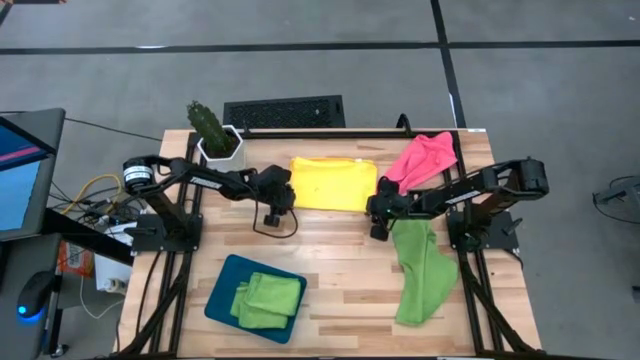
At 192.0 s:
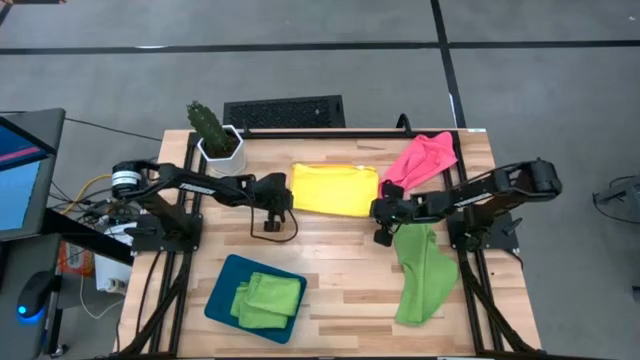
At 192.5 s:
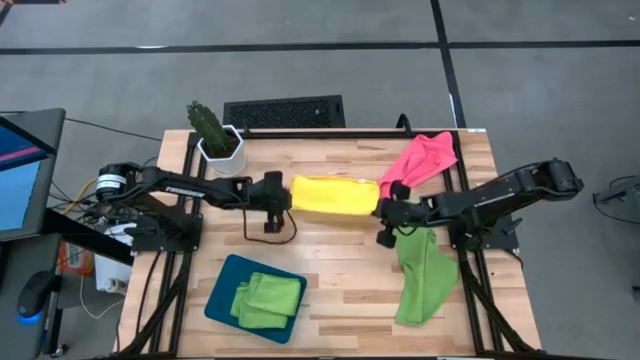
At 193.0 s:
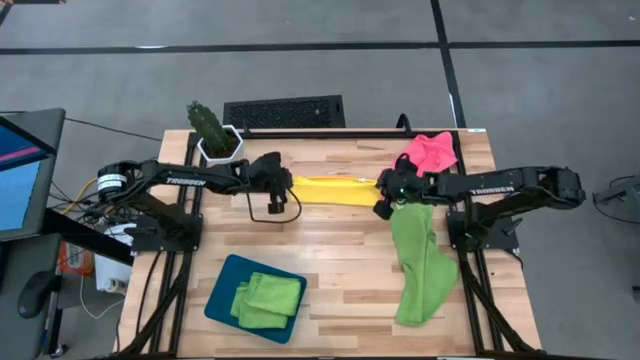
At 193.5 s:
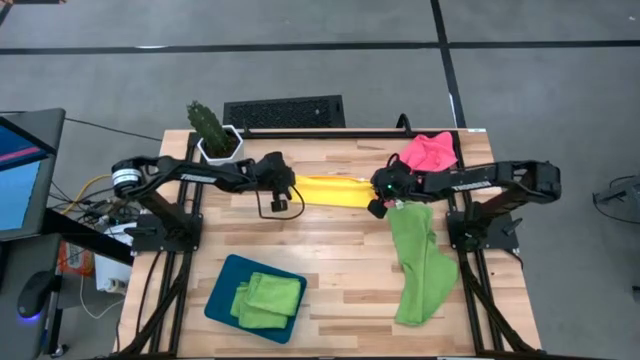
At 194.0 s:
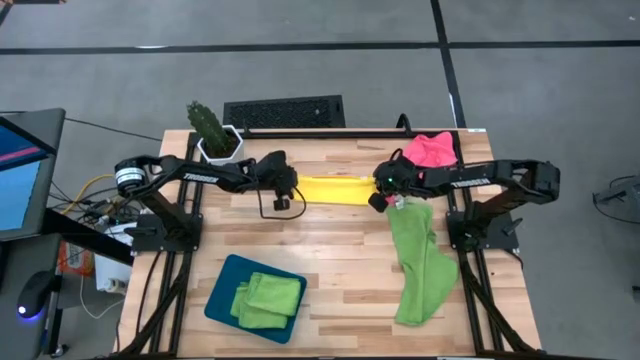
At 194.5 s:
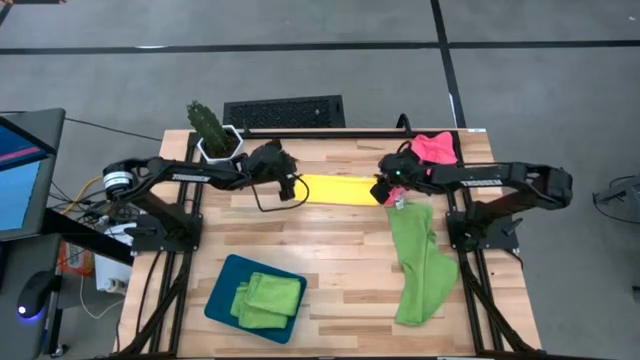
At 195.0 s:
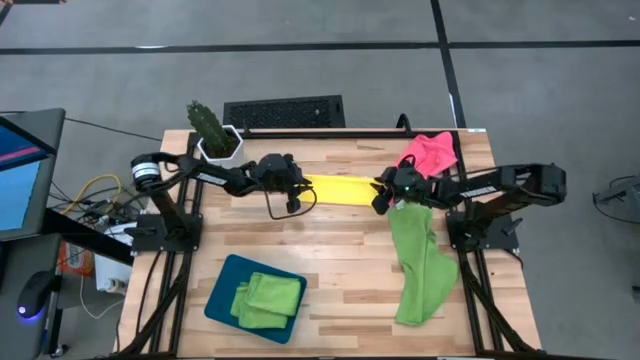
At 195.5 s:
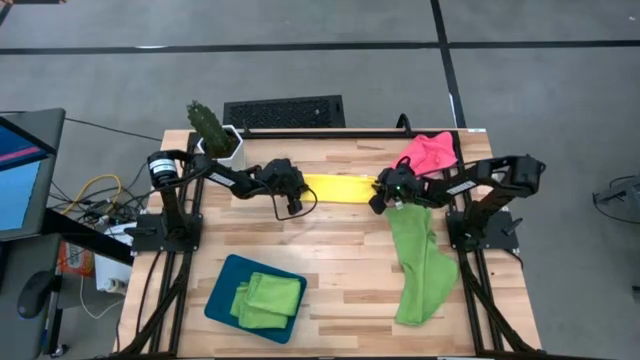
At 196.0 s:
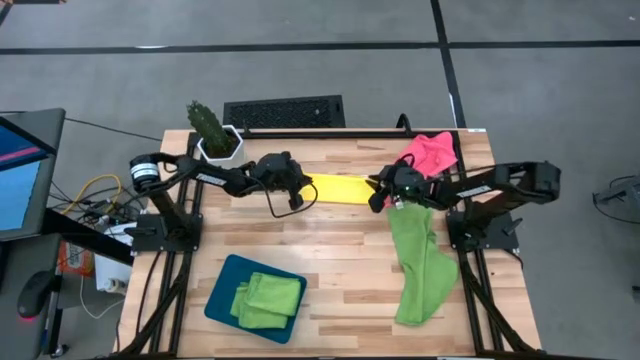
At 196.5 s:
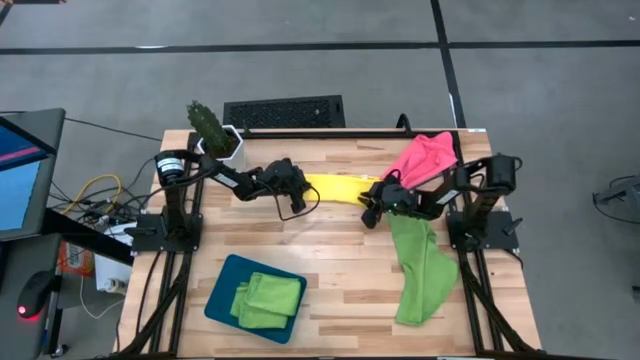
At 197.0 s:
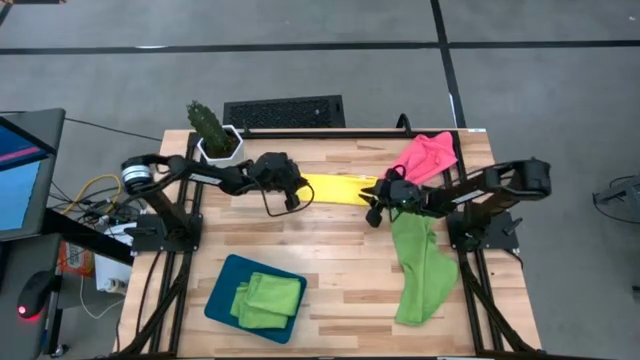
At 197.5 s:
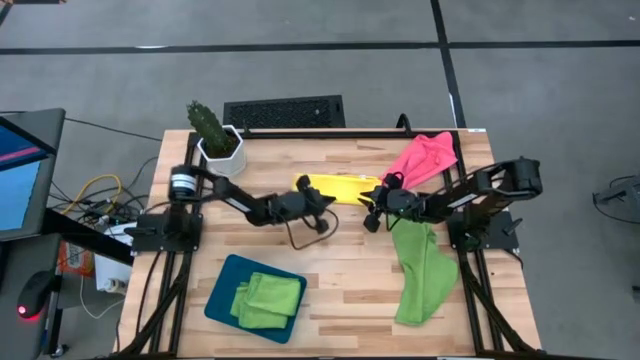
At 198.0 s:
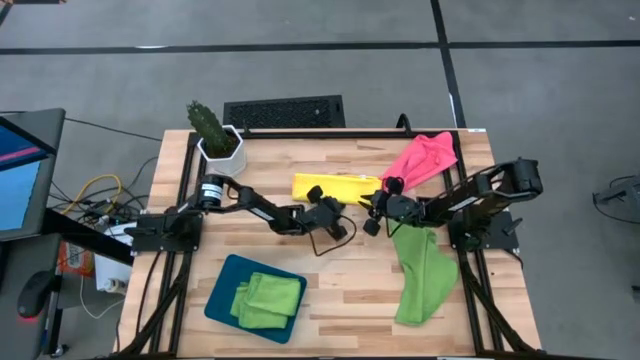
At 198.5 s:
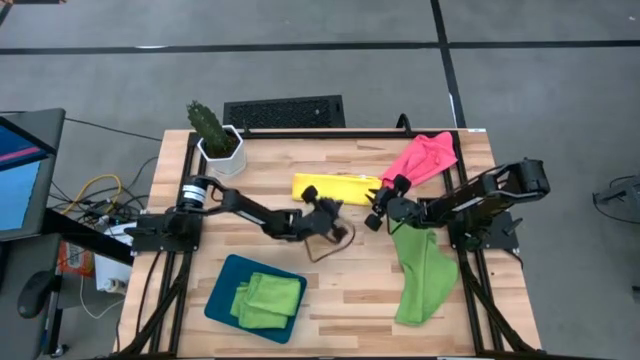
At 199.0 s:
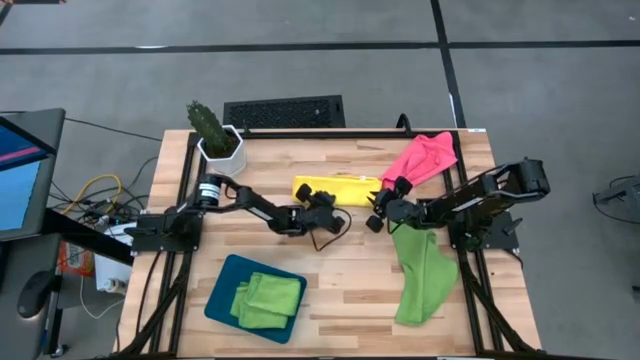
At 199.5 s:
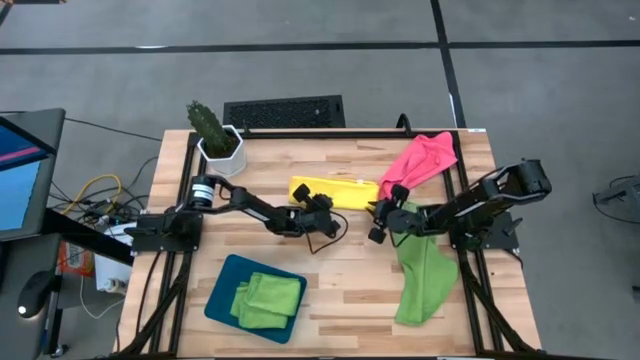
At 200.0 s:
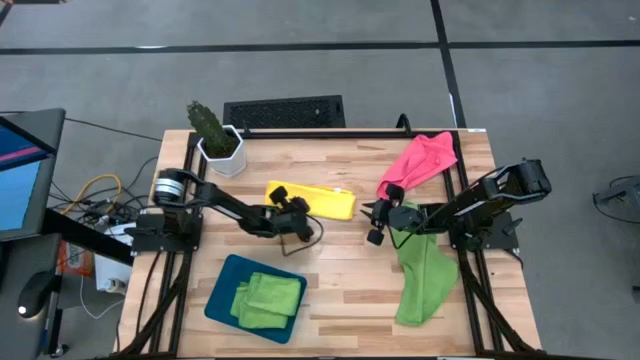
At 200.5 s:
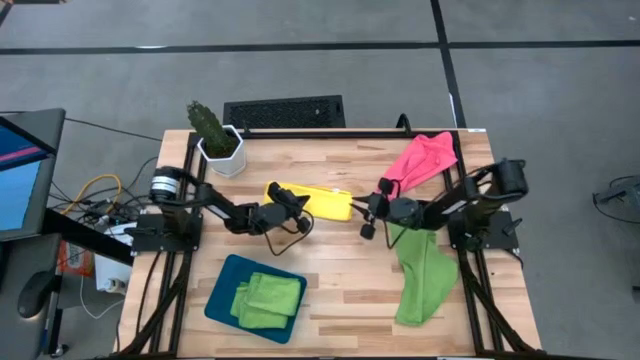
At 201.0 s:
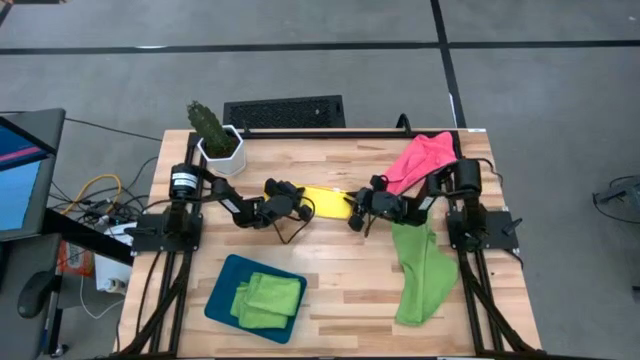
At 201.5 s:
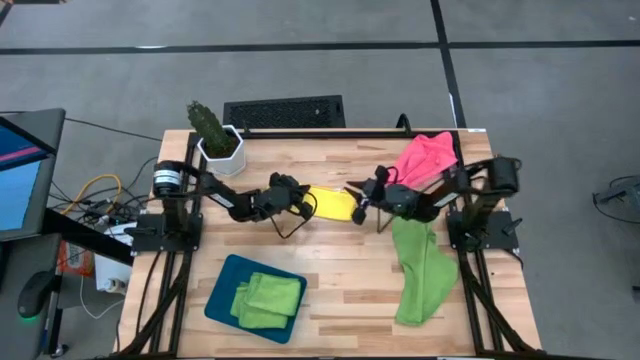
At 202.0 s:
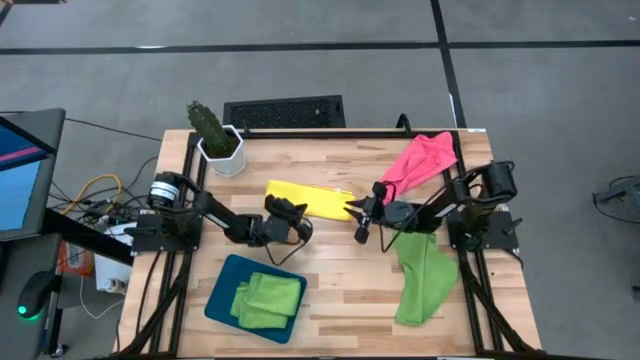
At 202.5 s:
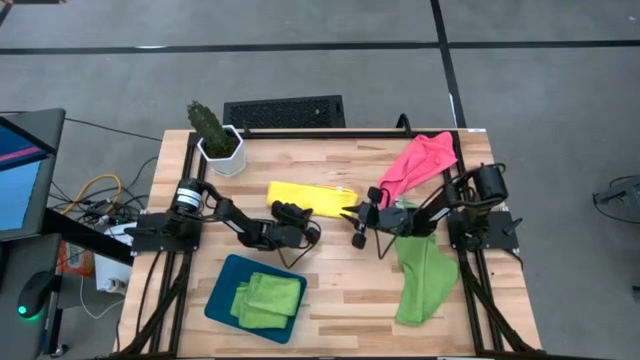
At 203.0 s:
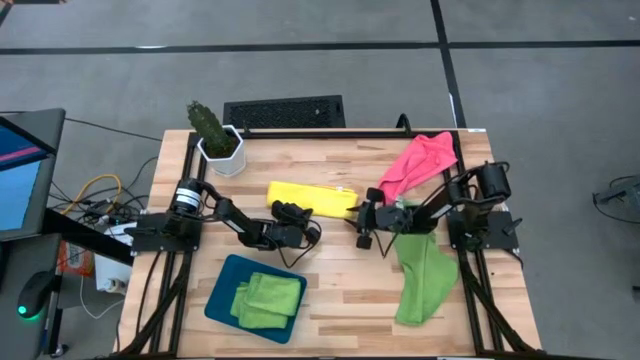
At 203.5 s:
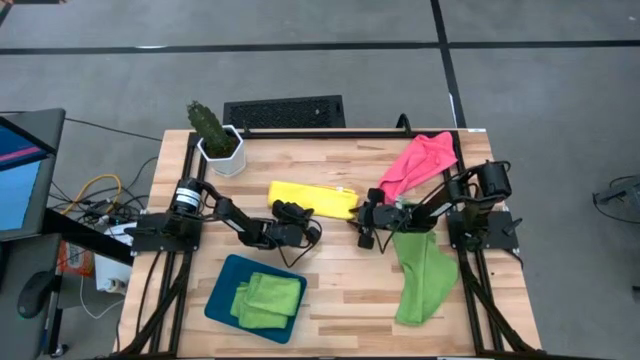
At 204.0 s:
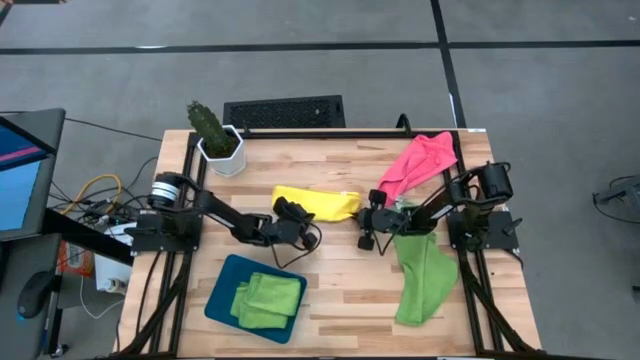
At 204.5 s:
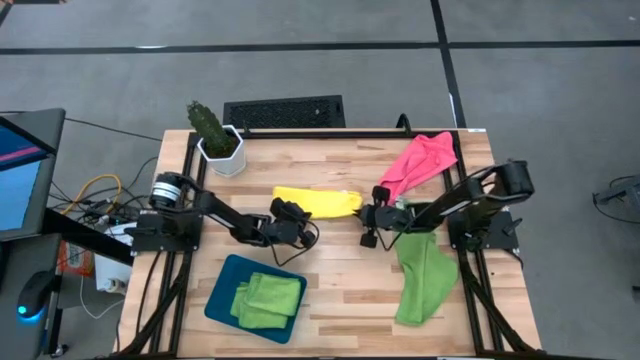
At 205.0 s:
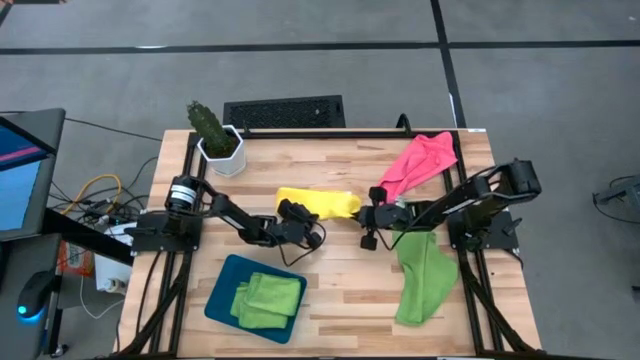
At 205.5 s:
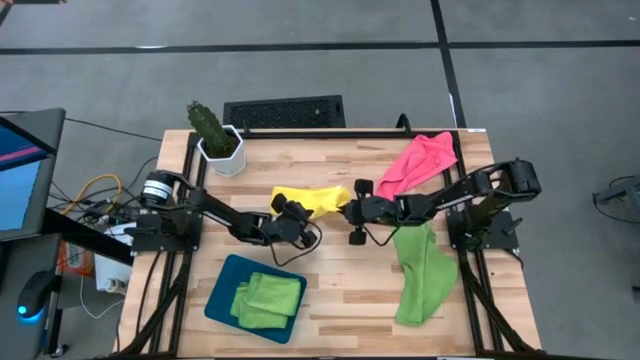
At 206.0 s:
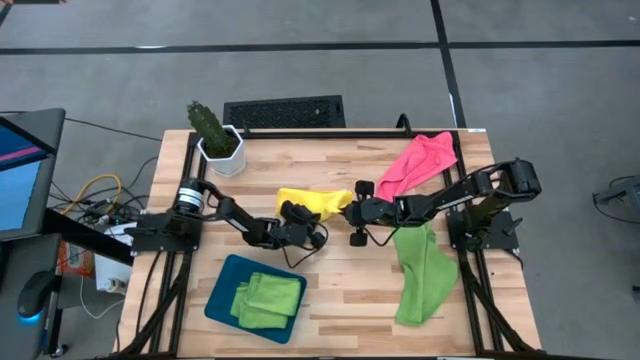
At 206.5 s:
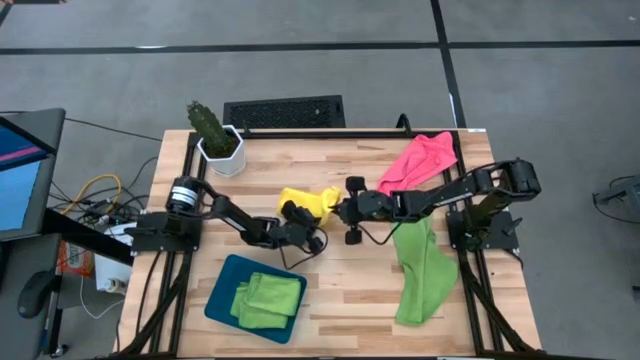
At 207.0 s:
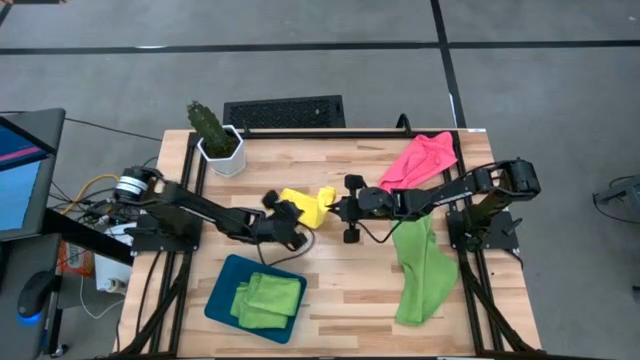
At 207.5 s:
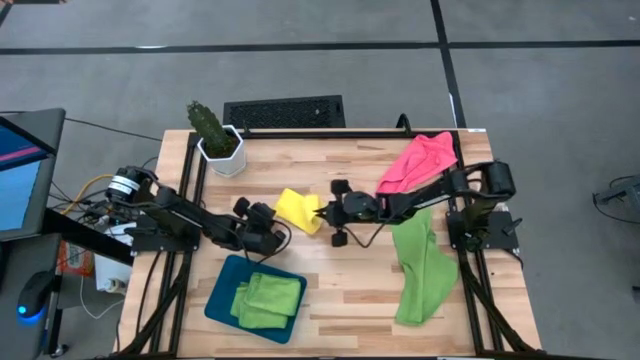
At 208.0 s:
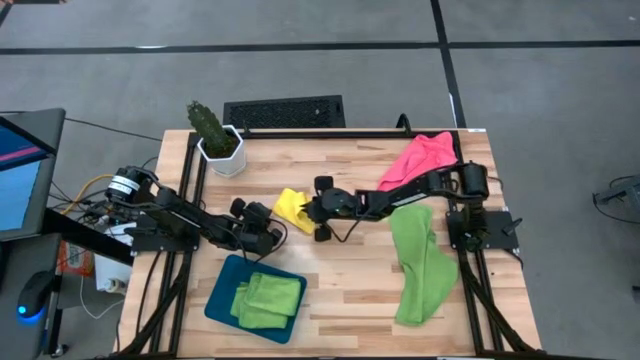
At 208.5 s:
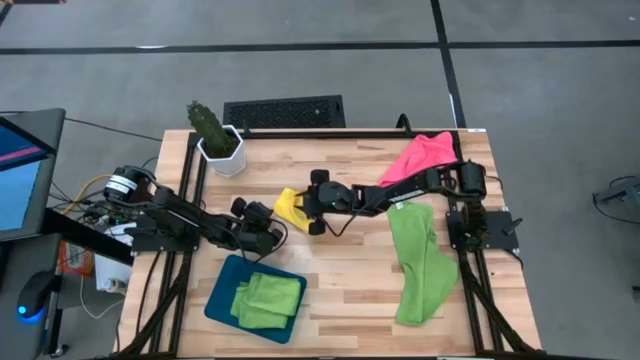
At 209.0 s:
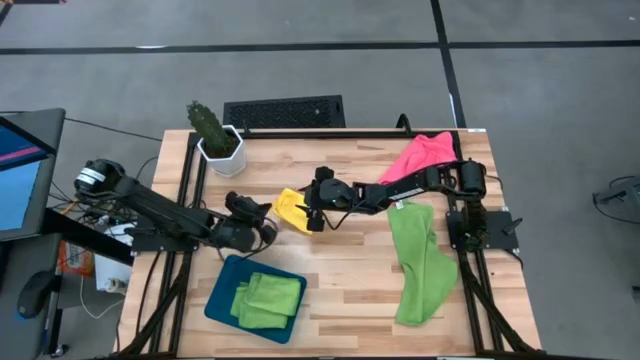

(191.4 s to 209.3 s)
Task: Fold microfiber towels
Fold the yellow microfiber

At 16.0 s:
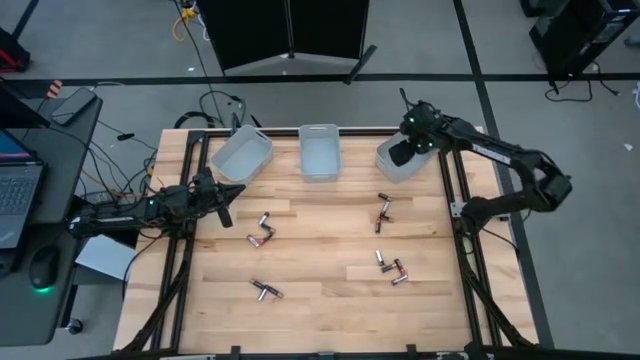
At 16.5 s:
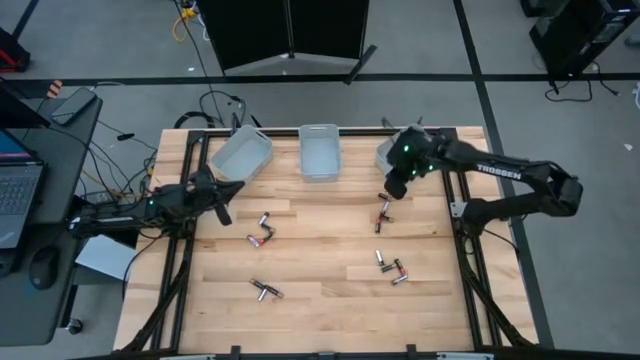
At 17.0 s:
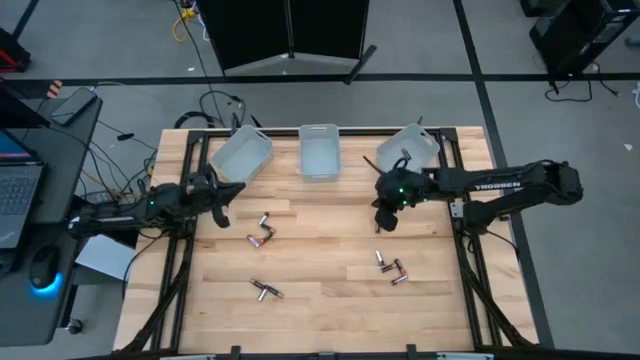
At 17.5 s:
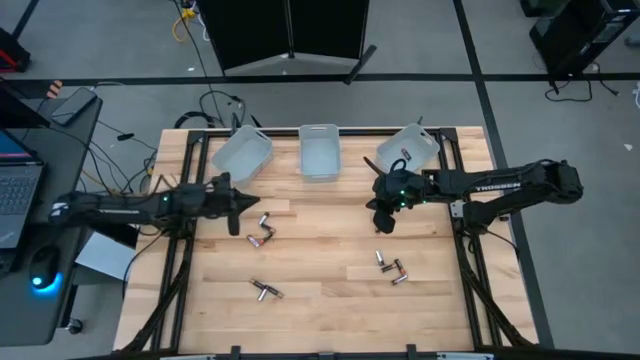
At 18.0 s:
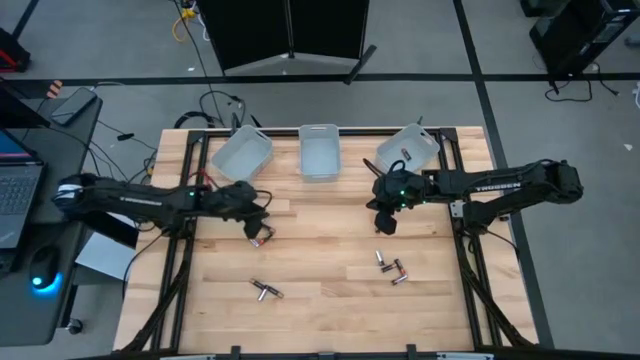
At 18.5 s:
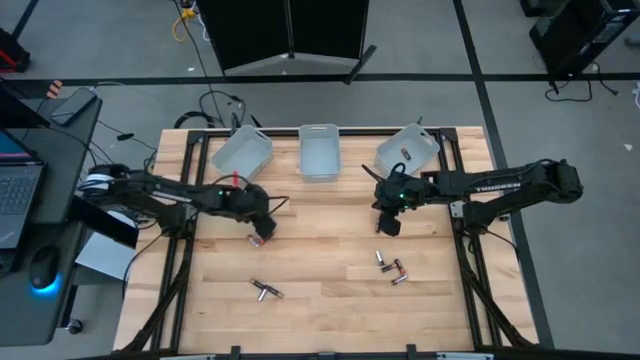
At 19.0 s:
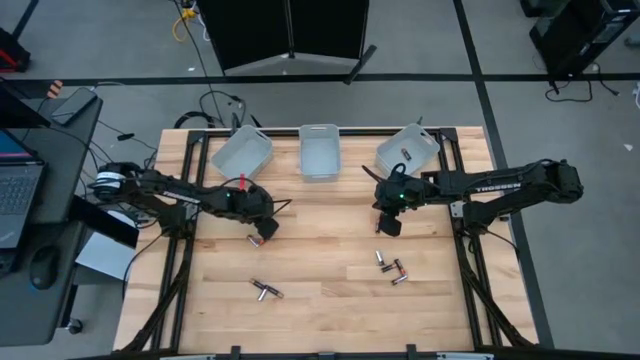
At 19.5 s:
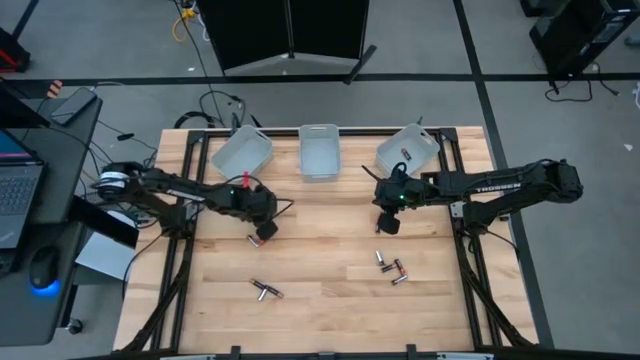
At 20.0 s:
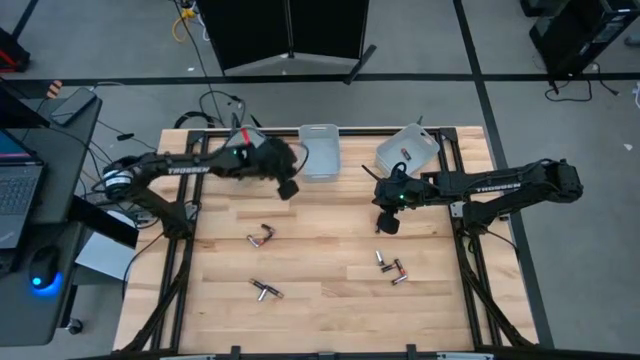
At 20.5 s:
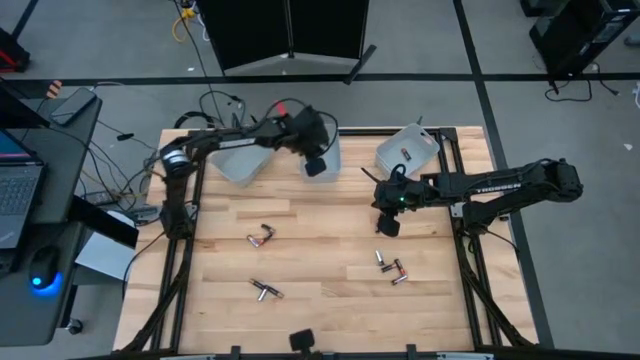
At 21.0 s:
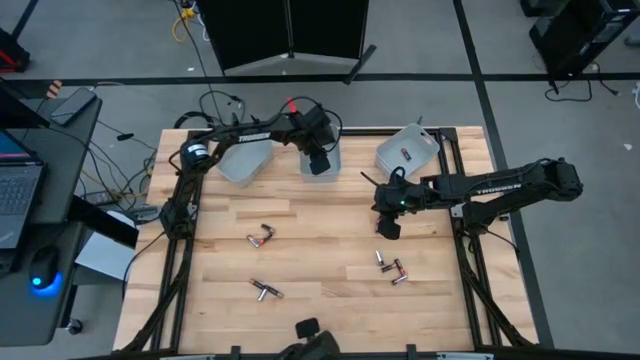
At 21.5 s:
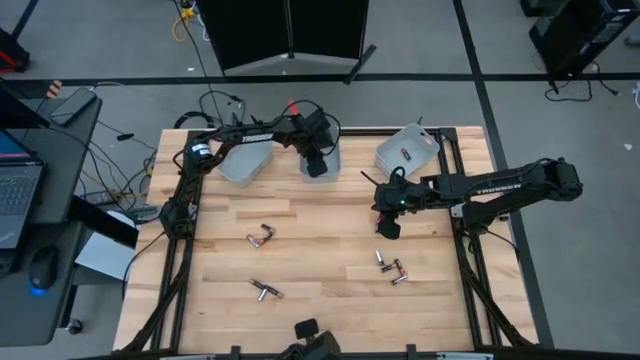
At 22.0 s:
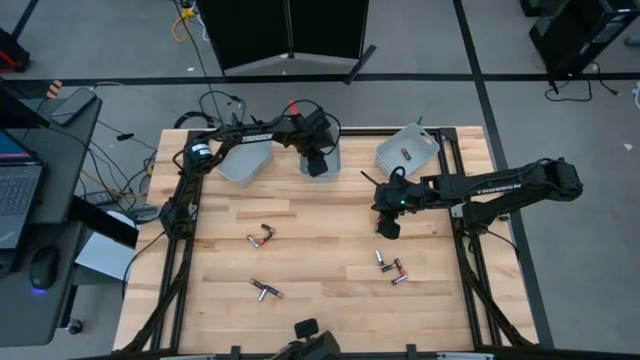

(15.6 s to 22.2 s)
Task: Sort batteries
Put the silver battery into the middle gray bin
